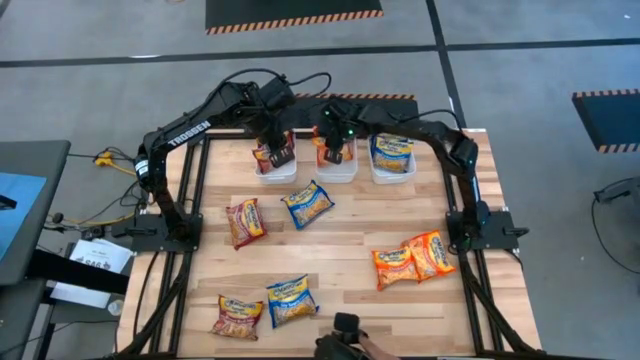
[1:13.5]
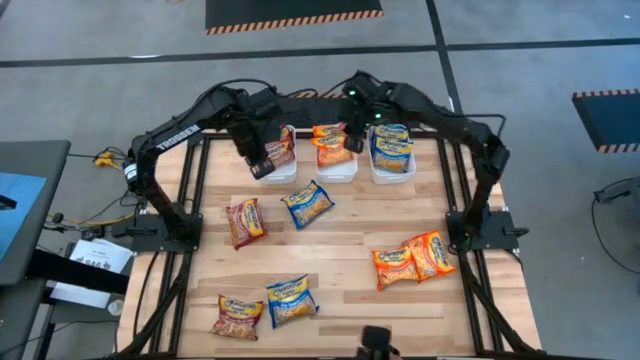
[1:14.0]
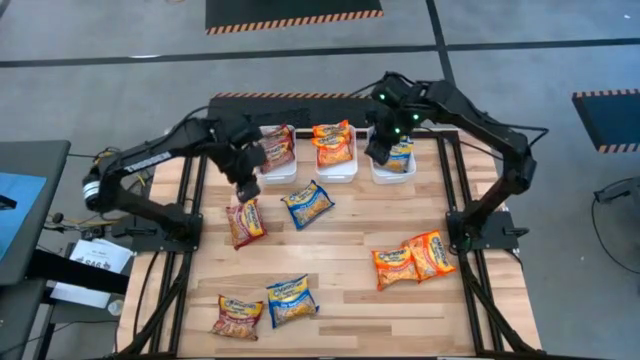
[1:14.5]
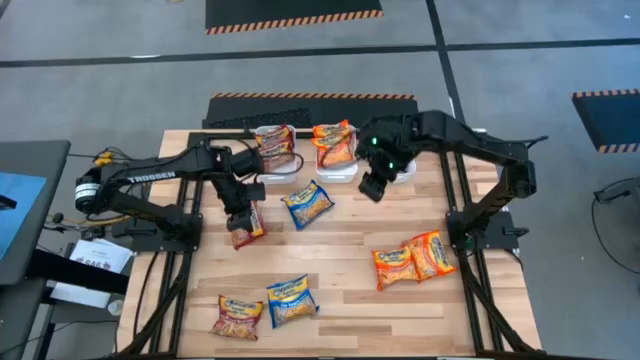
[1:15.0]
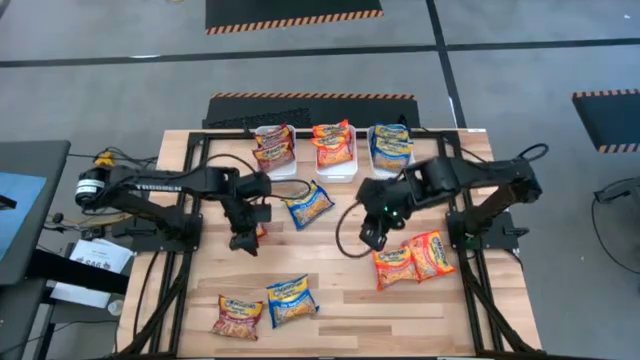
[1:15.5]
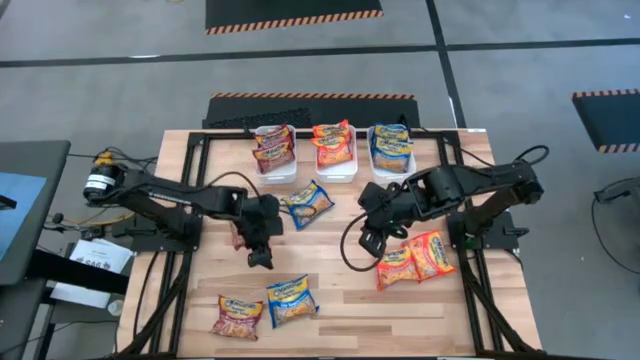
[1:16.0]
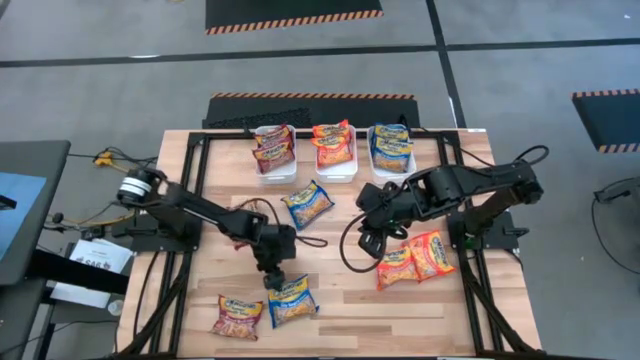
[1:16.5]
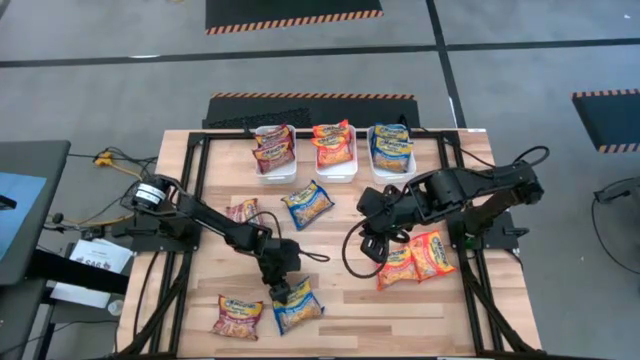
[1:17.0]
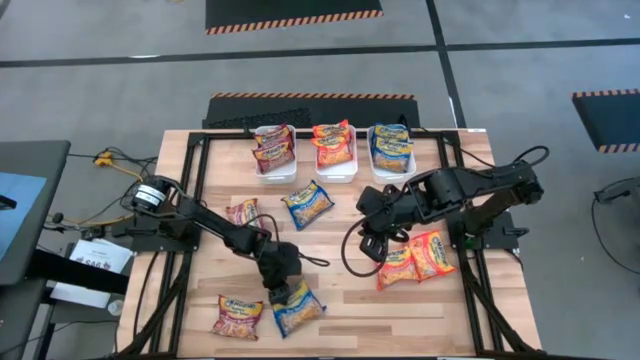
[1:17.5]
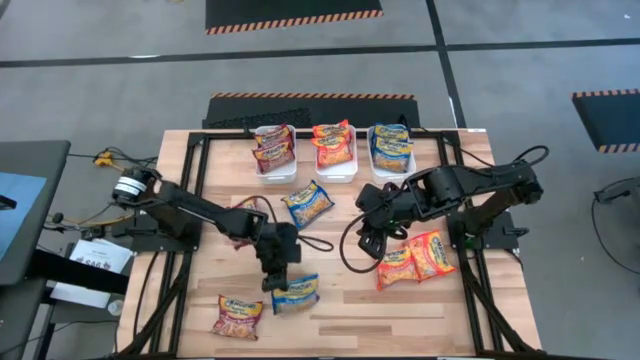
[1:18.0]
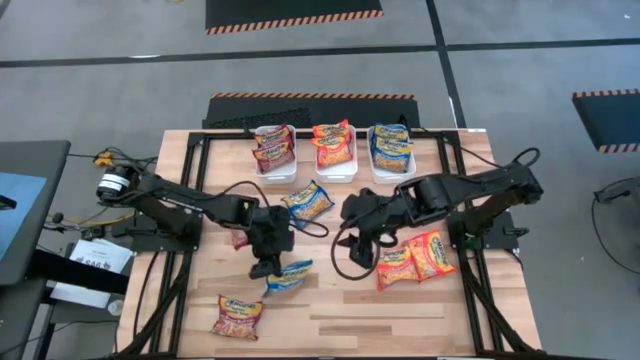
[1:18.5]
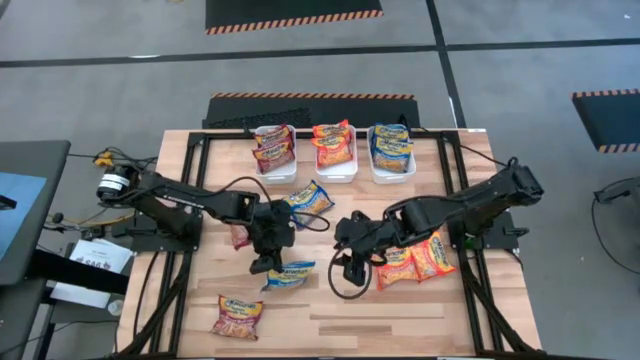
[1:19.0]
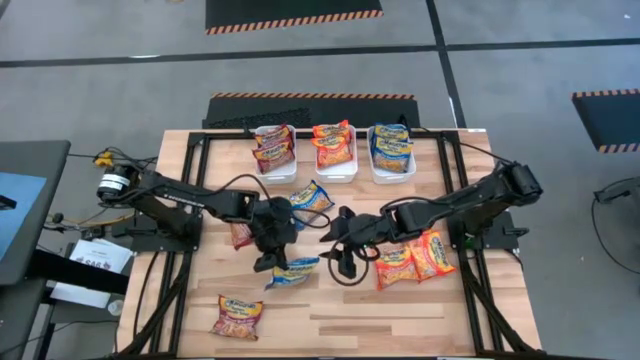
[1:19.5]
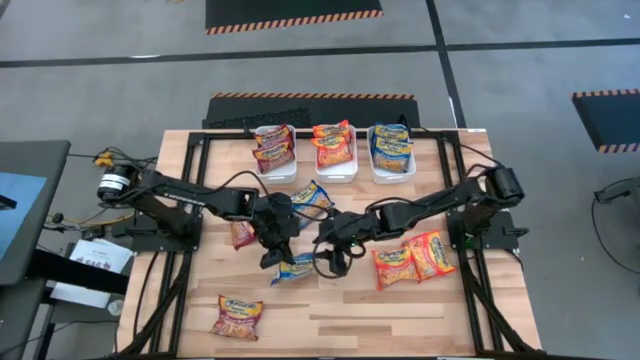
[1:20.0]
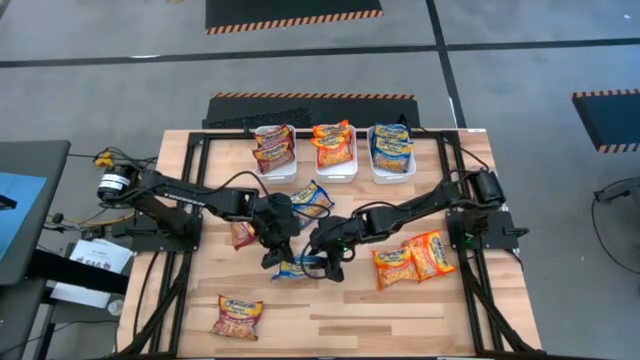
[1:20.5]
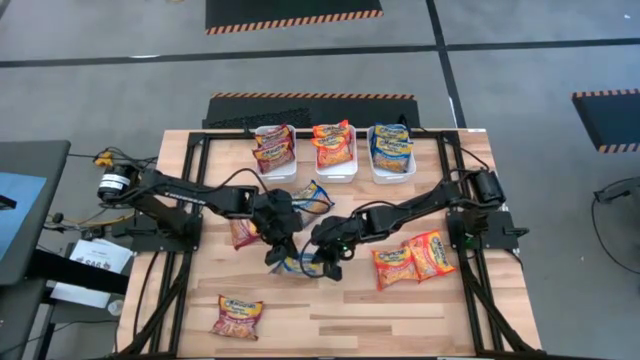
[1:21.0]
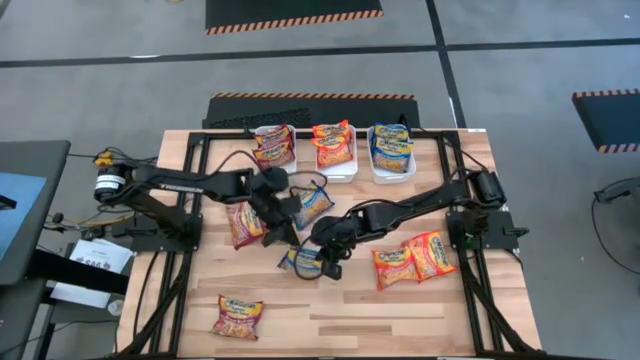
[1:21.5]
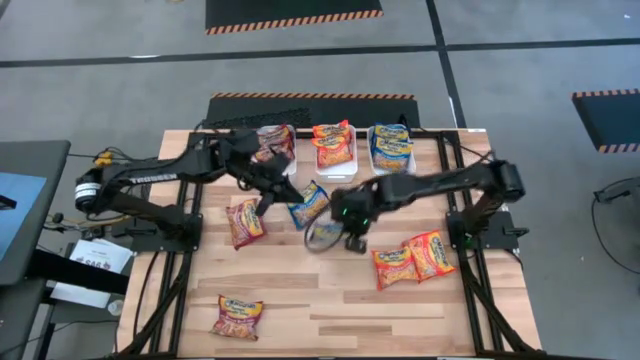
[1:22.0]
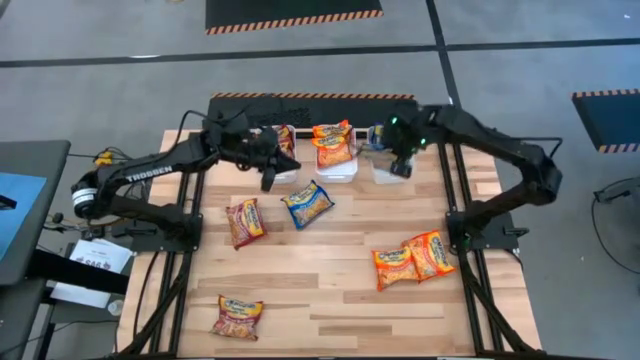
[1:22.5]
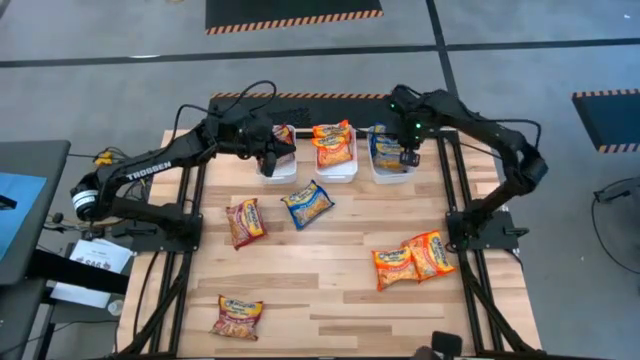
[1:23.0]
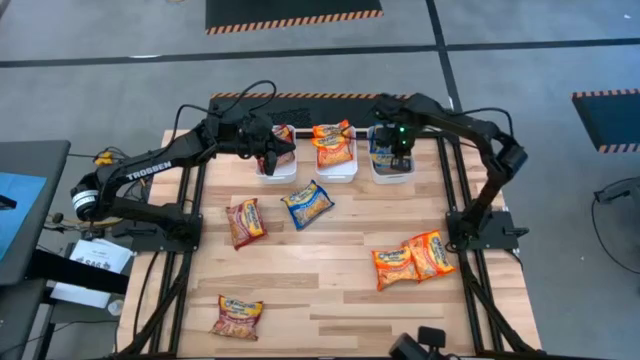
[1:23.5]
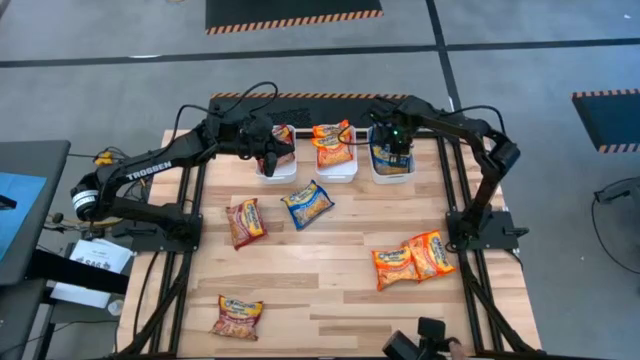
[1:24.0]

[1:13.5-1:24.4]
Task: Sort Maruchan noodles
Put the blue noodle pack into the right white bin

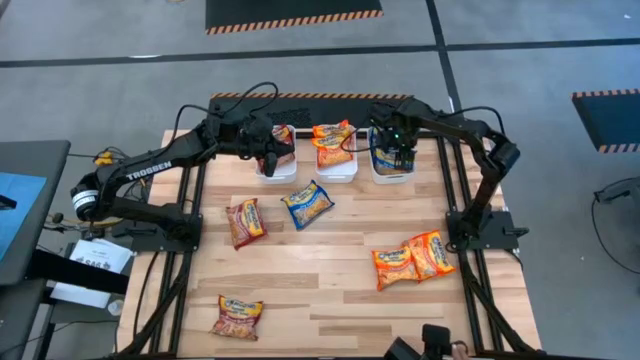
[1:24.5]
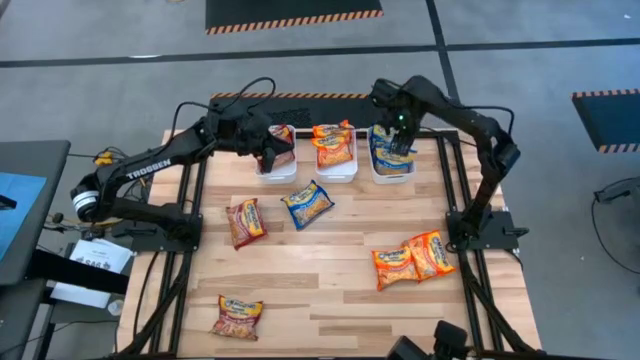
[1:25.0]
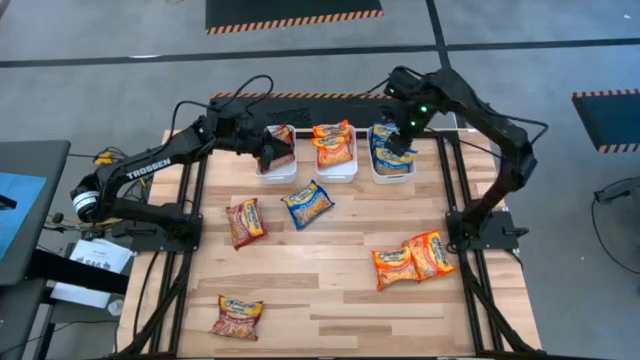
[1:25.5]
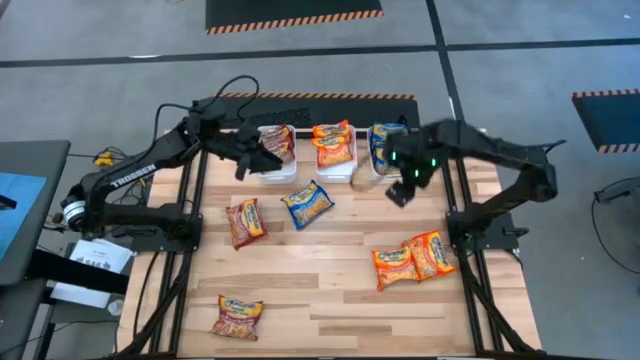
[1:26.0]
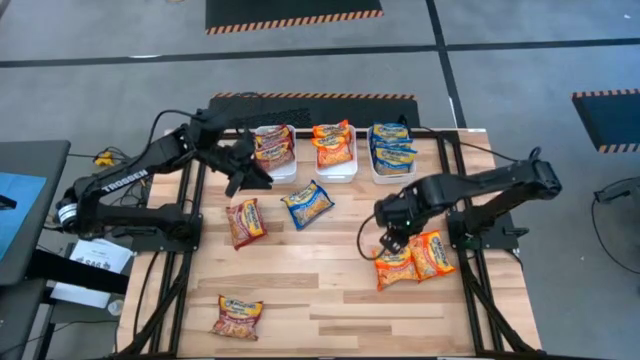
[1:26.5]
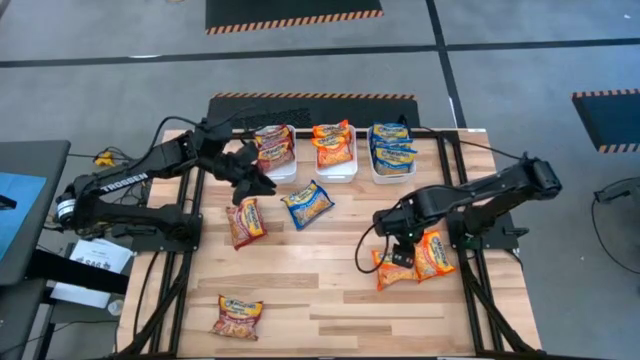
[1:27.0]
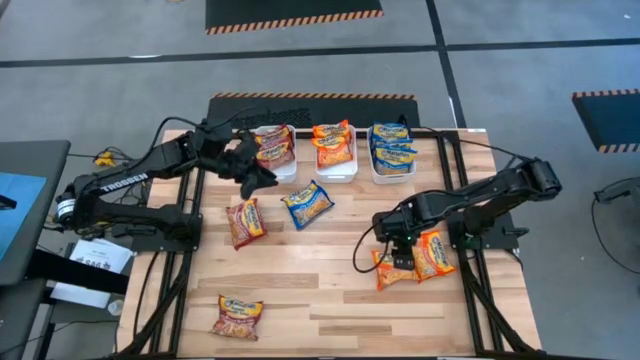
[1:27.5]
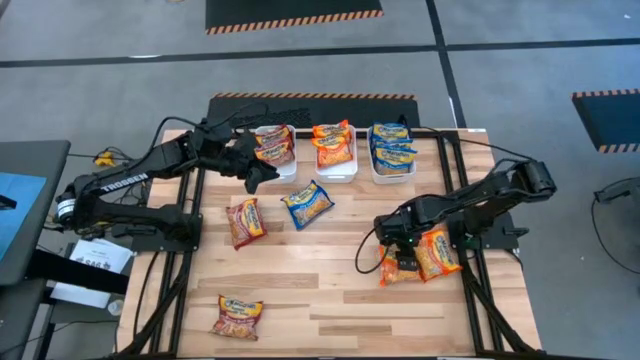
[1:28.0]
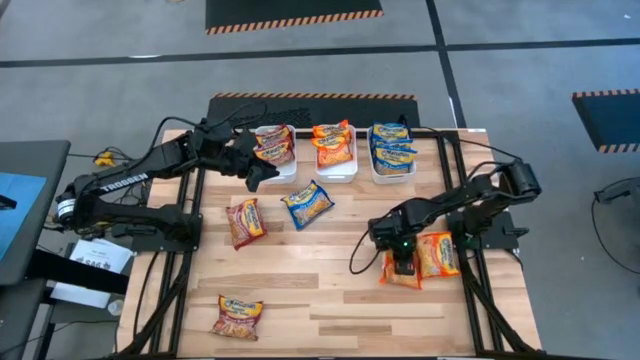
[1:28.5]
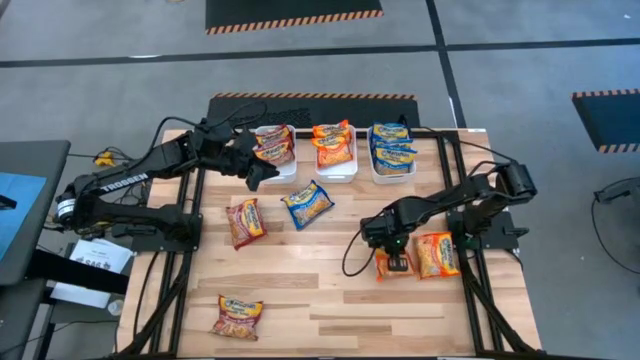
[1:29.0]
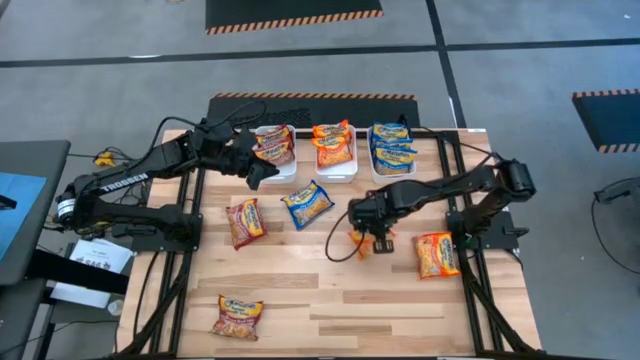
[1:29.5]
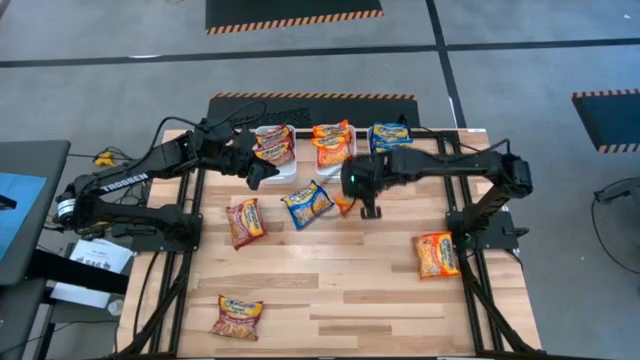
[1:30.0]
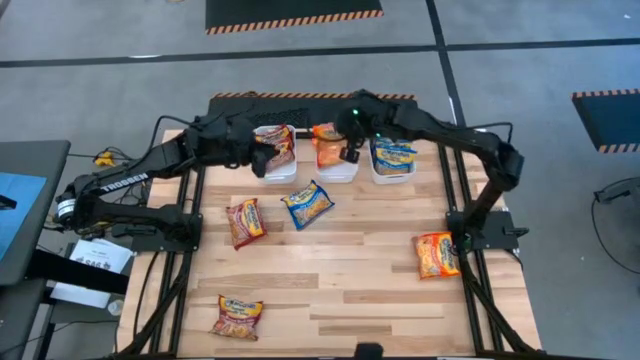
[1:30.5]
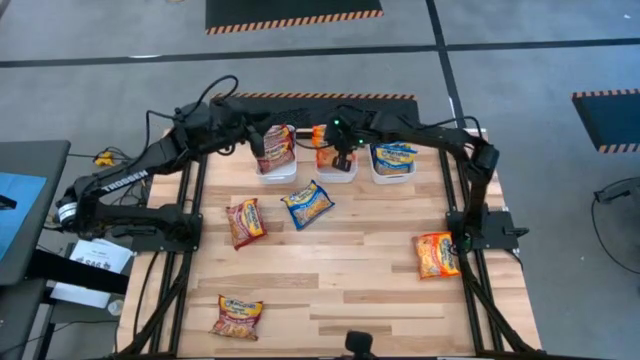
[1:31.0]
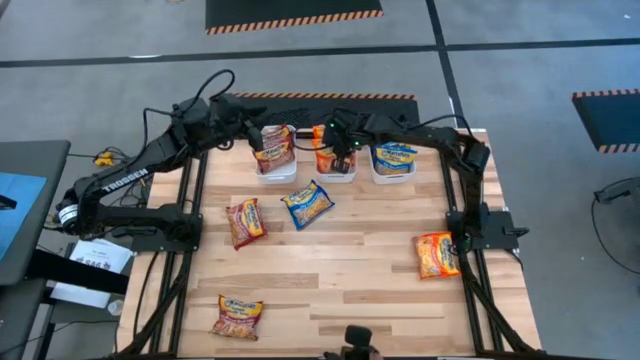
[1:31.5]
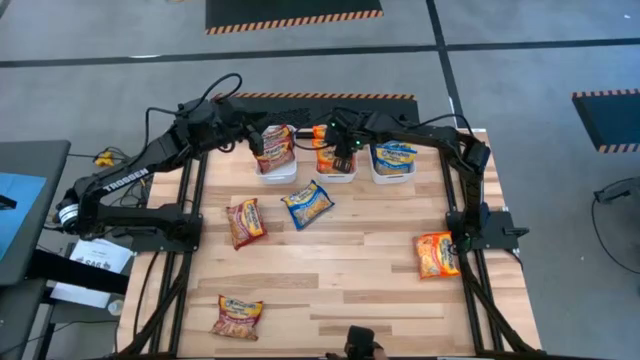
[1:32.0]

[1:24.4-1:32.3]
Put the orange noodle pack into the middle white bin

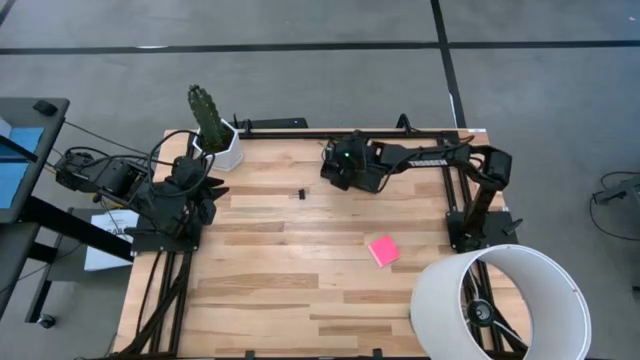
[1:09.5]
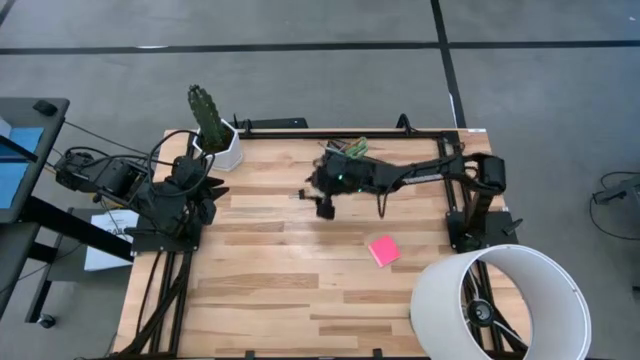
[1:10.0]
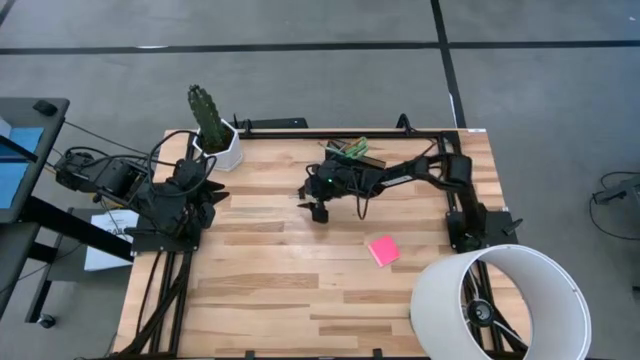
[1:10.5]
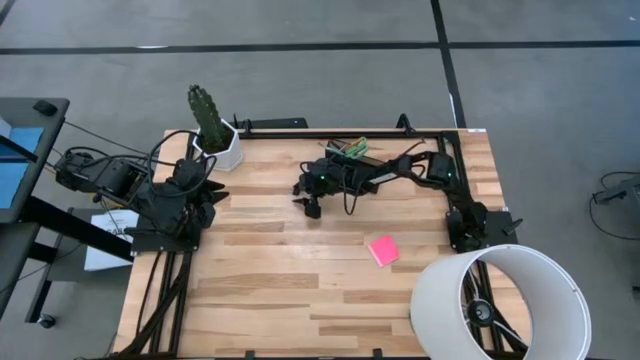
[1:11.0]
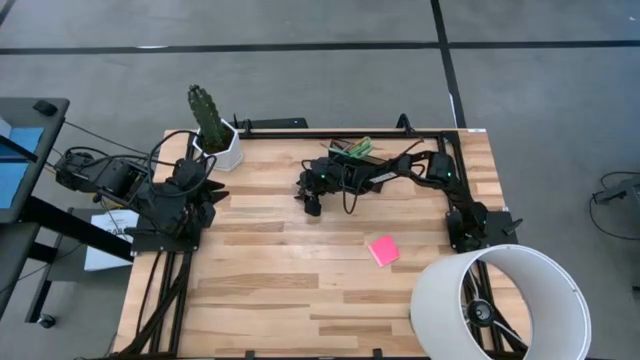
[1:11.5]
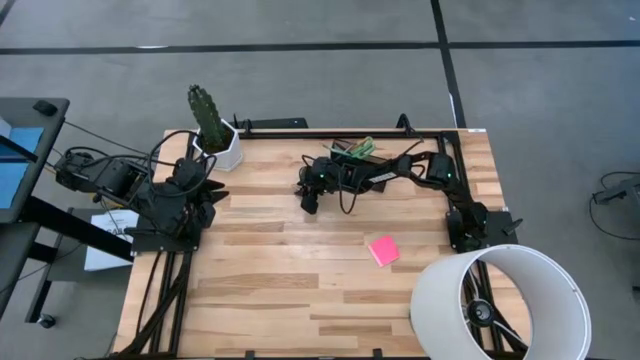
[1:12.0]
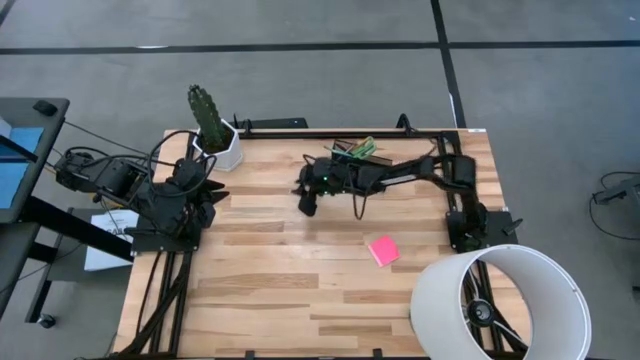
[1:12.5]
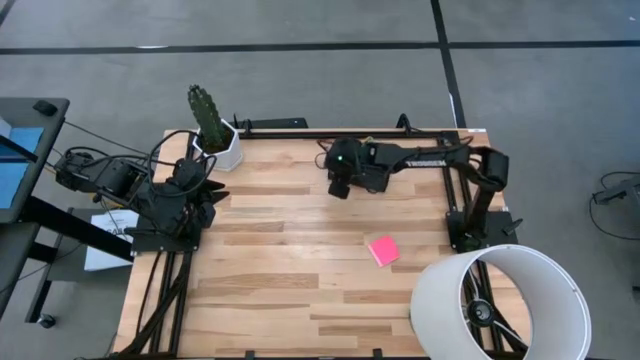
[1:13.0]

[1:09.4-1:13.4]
Task: Pick and place office supplies into organizer
Put the black binder clip into the black desk organizer

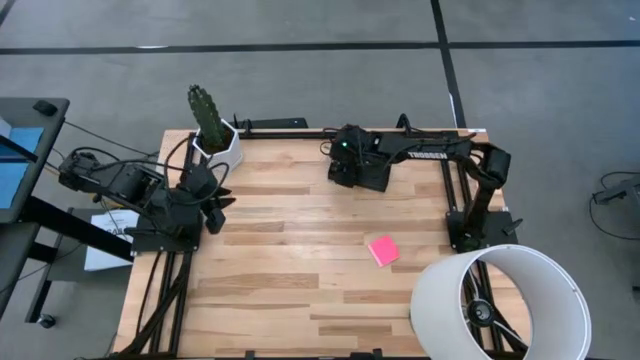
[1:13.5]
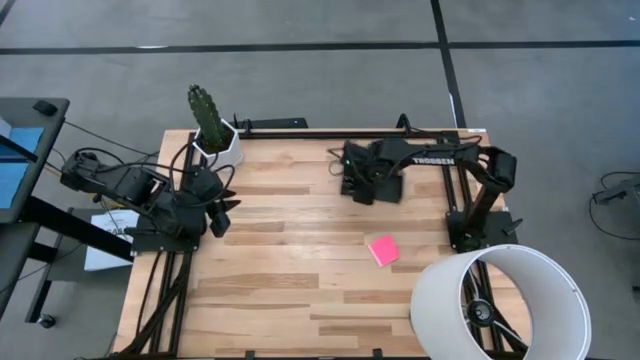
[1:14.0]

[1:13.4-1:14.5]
Adjust the black desk organizer on the table
